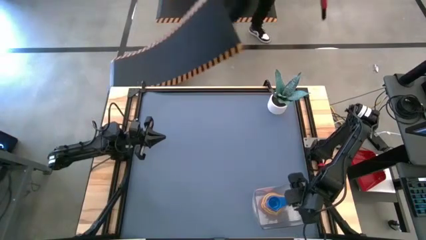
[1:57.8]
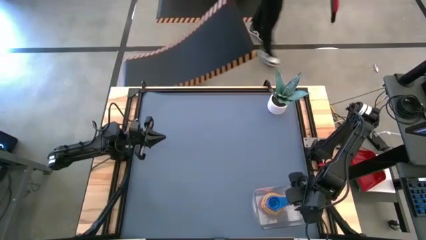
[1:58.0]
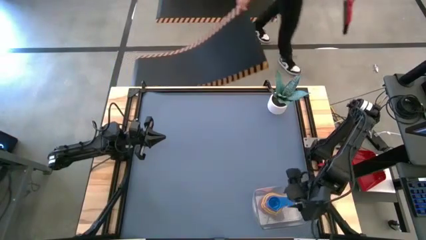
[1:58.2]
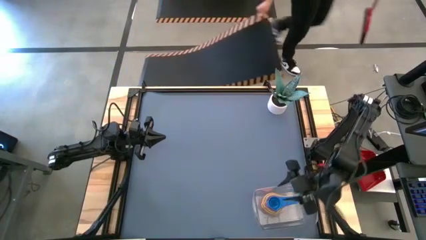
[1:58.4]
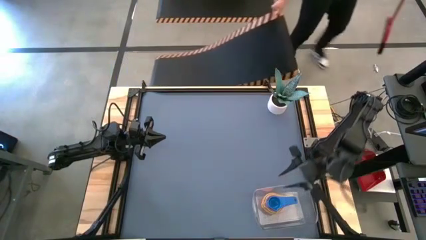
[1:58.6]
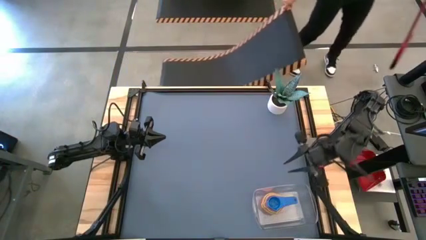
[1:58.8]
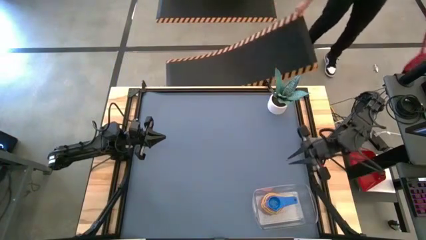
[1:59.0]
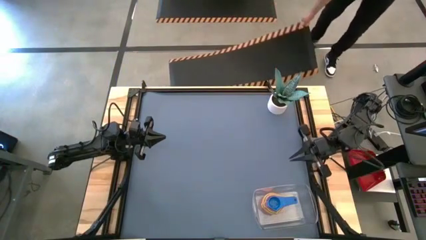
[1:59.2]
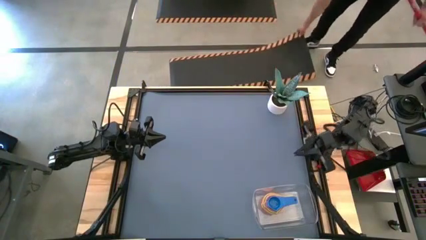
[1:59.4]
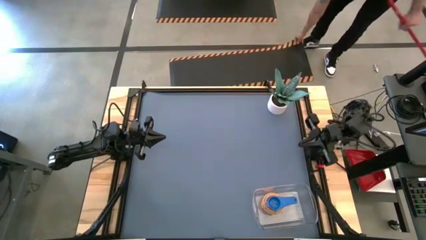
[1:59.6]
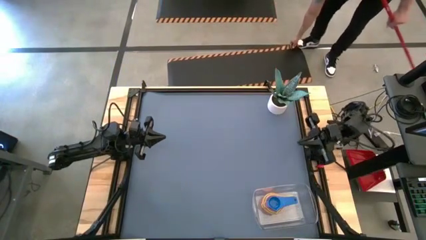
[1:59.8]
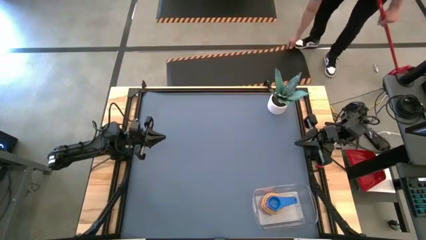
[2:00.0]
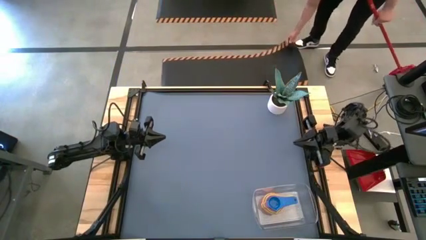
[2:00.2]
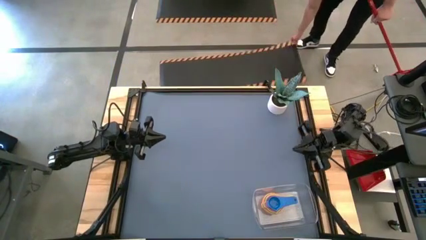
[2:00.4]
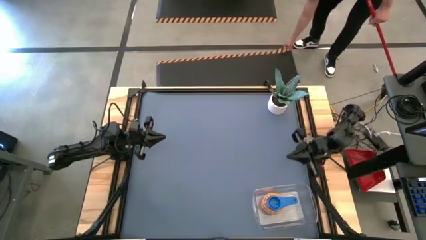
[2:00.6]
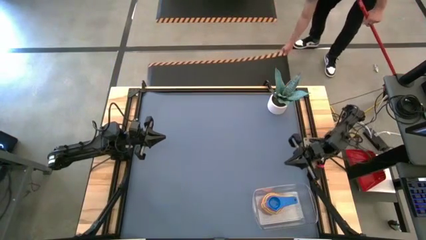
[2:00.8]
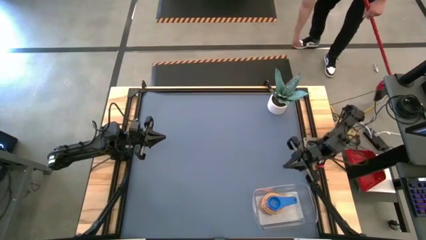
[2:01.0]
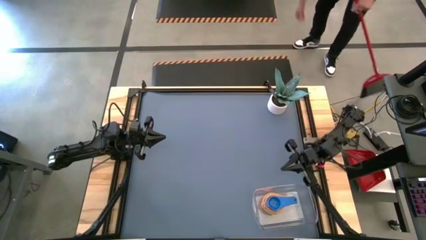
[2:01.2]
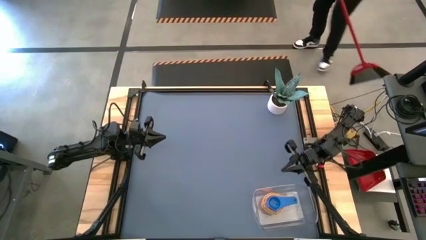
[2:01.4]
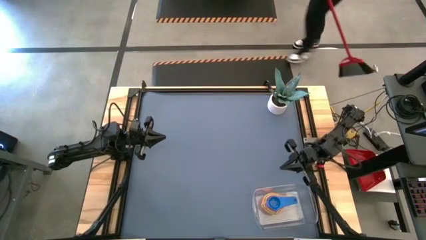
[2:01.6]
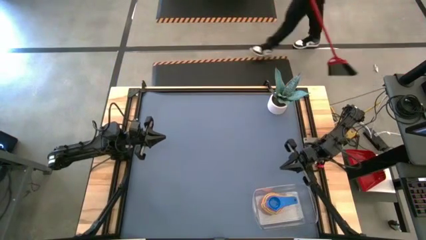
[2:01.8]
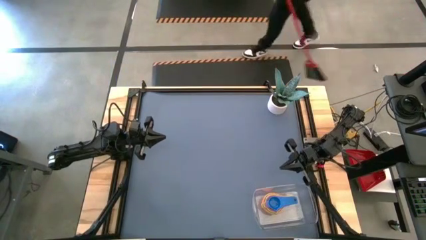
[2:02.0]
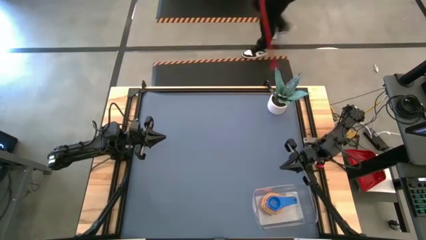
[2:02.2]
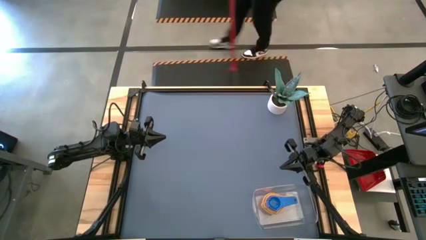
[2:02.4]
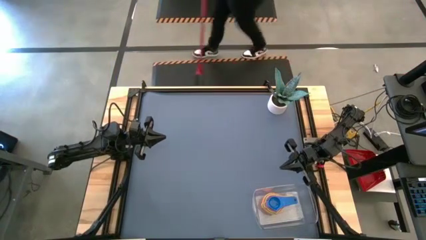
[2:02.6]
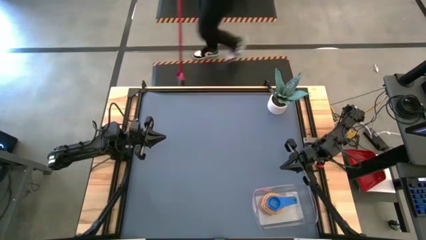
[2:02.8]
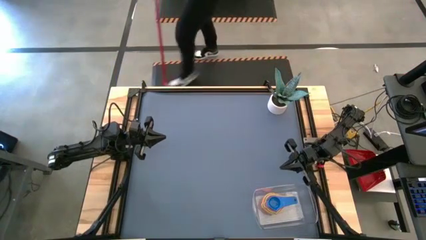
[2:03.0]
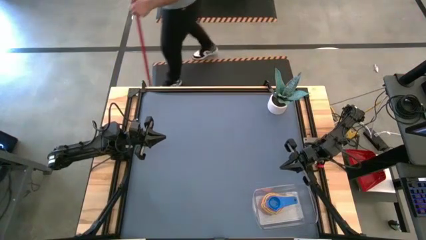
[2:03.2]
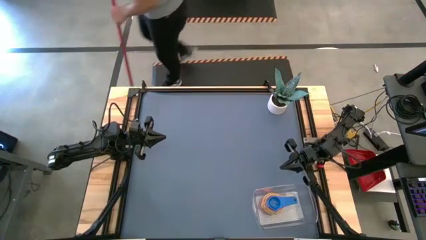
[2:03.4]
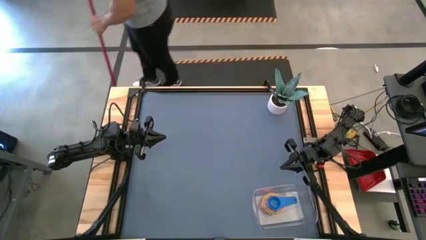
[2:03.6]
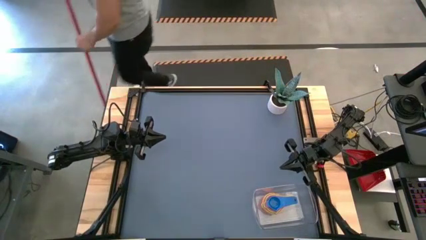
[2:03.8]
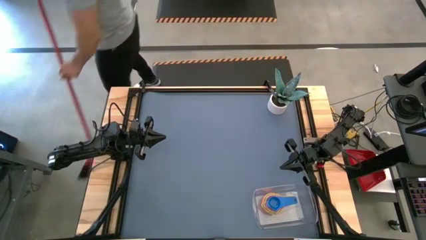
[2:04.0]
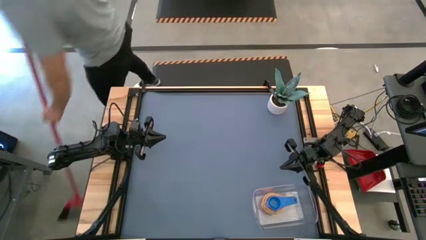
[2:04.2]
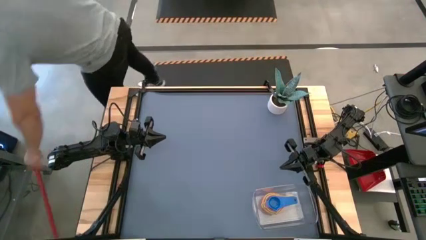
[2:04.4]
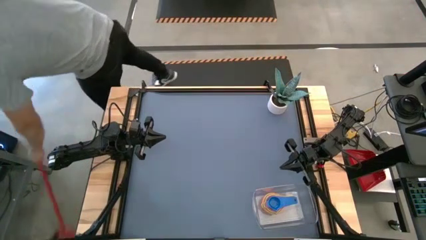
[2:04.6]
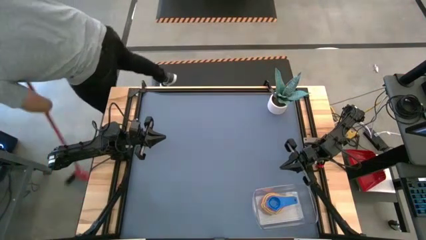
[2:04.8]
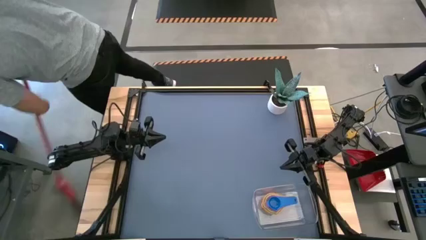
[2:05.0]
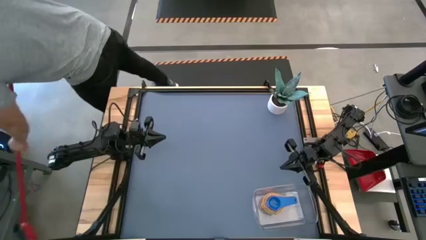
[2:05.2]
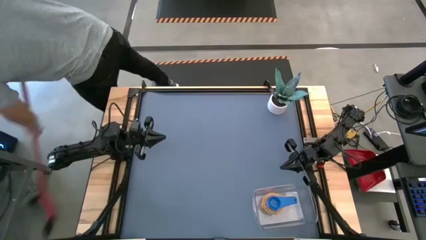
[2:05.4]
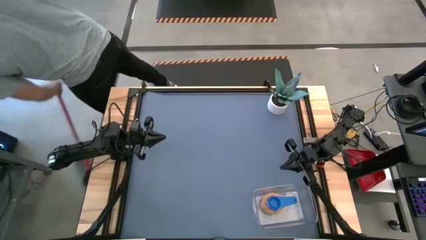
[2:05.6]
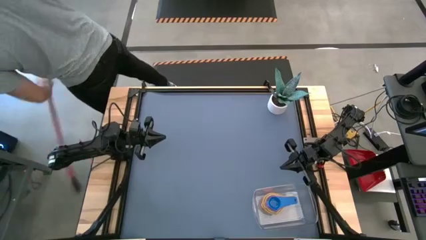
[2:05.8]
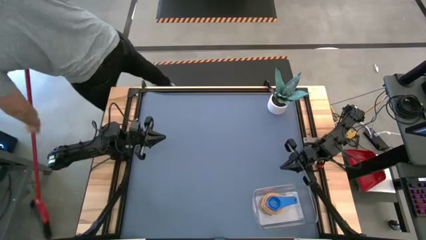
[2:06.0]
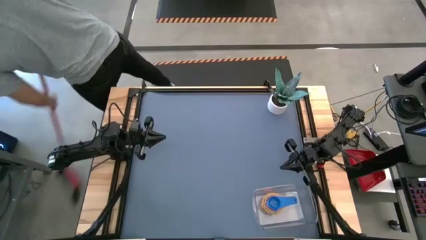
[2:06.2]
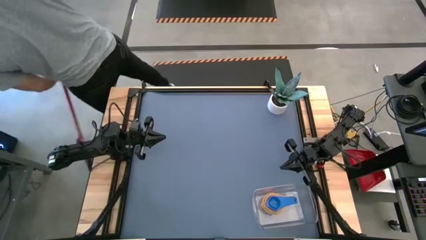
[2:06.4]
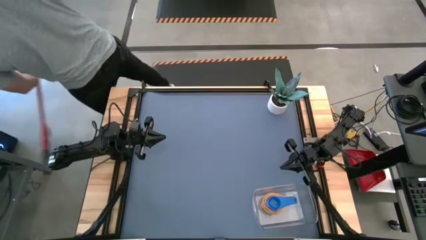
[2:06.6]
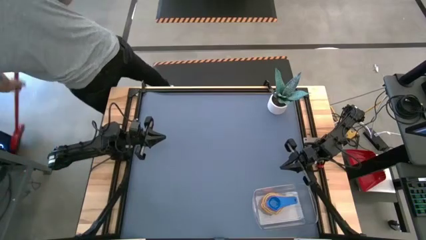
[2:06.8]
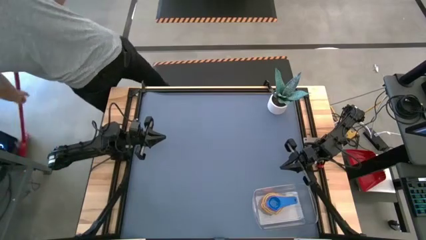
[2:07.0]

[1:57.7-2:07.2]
Task: Nest measuring cups in basket
Return to Home Position

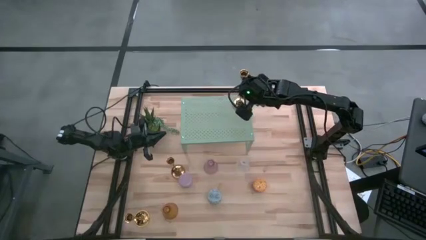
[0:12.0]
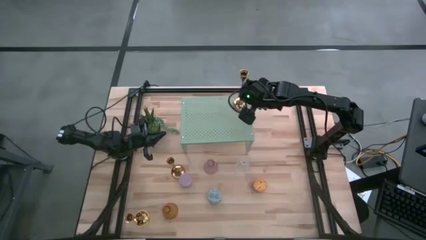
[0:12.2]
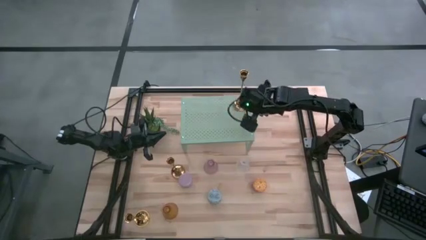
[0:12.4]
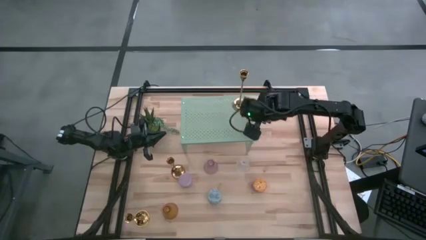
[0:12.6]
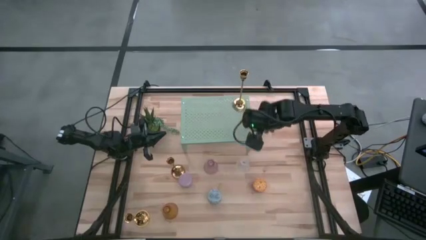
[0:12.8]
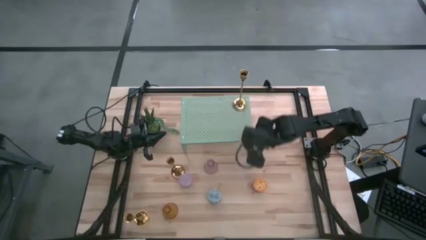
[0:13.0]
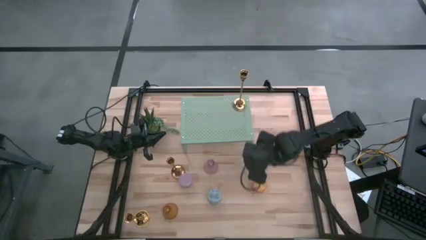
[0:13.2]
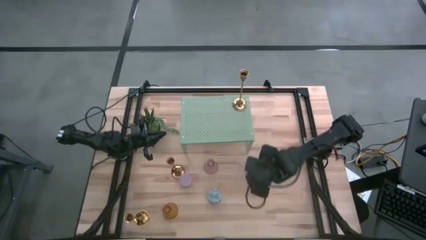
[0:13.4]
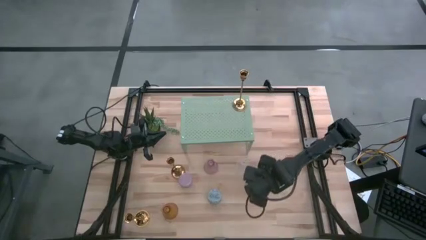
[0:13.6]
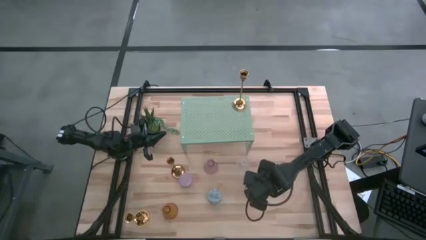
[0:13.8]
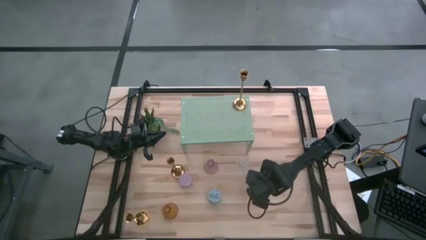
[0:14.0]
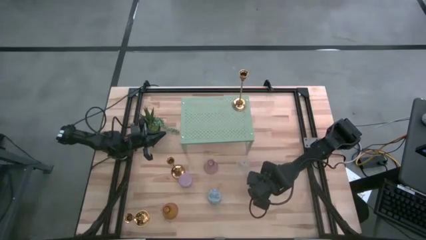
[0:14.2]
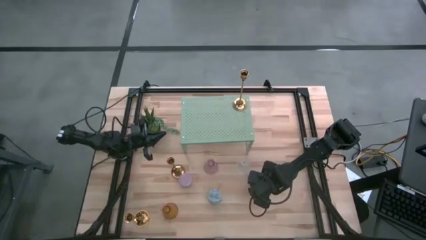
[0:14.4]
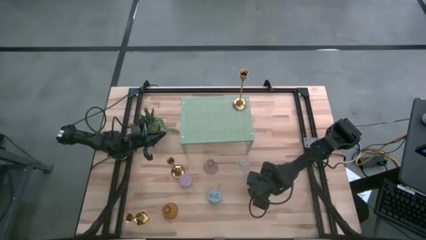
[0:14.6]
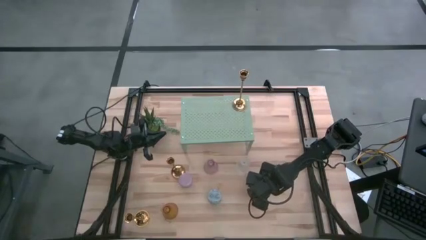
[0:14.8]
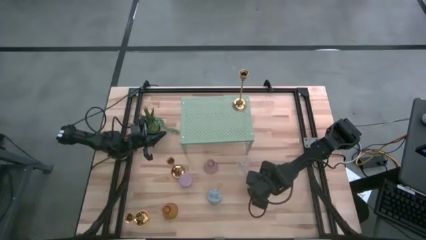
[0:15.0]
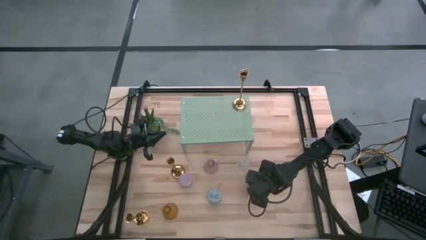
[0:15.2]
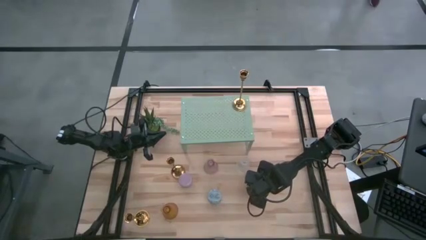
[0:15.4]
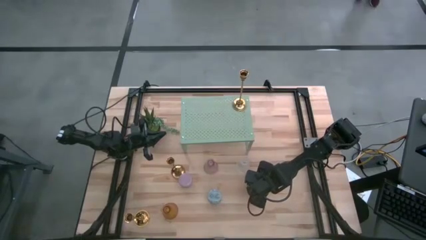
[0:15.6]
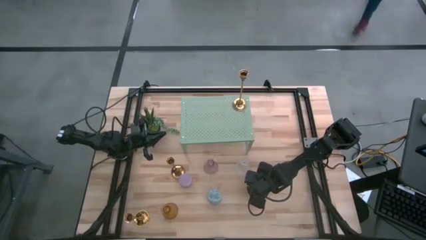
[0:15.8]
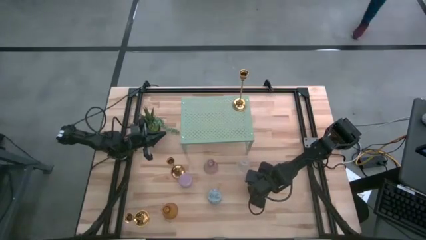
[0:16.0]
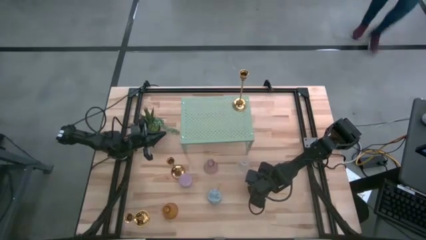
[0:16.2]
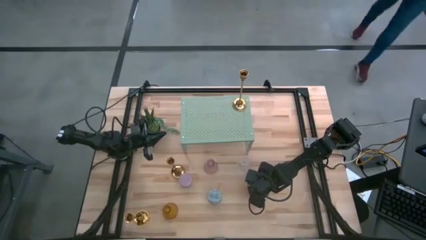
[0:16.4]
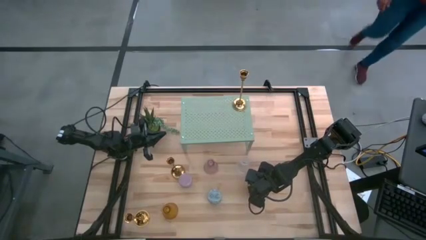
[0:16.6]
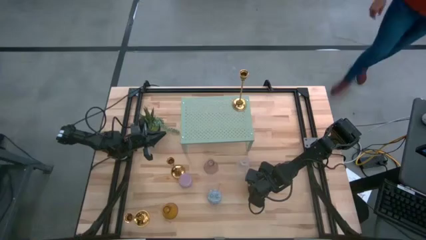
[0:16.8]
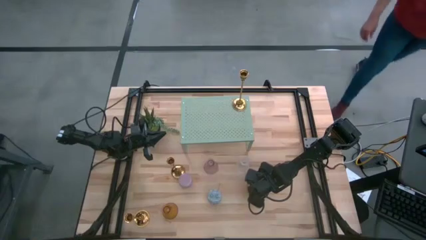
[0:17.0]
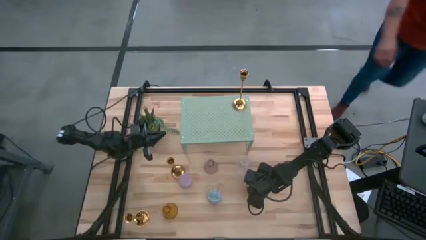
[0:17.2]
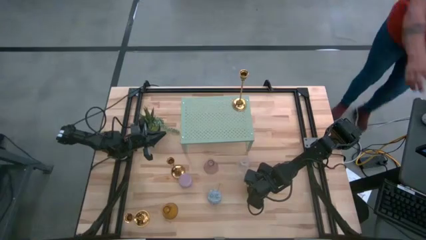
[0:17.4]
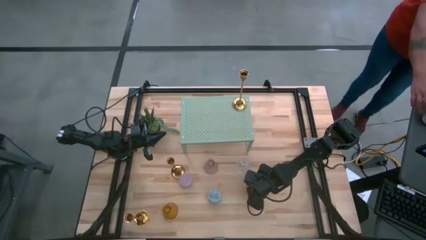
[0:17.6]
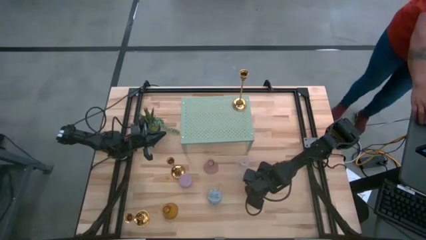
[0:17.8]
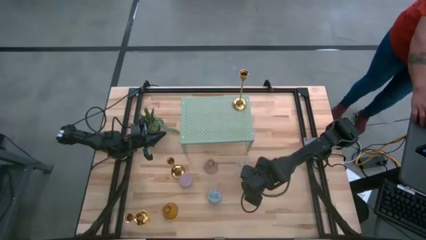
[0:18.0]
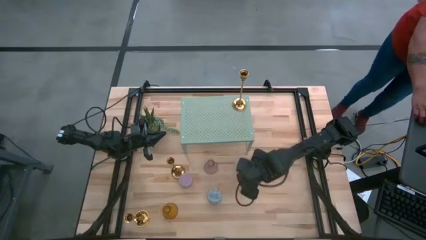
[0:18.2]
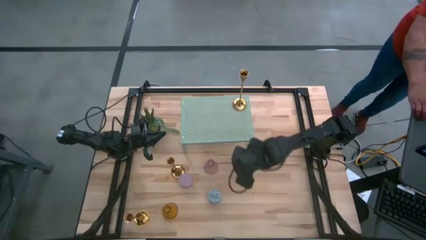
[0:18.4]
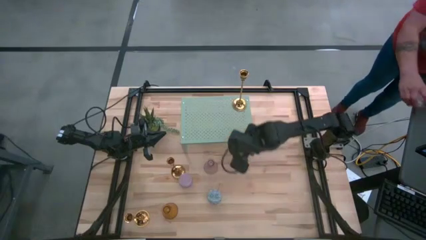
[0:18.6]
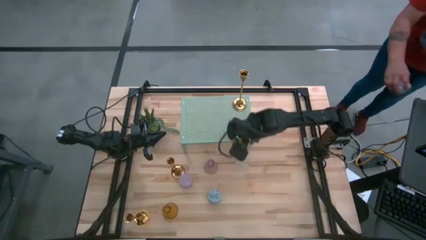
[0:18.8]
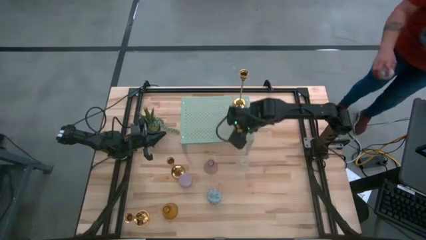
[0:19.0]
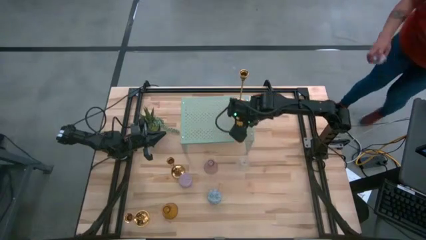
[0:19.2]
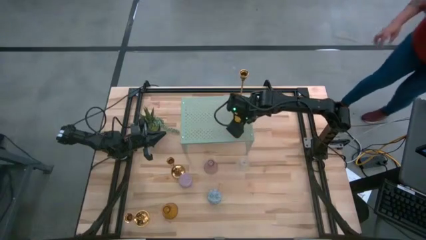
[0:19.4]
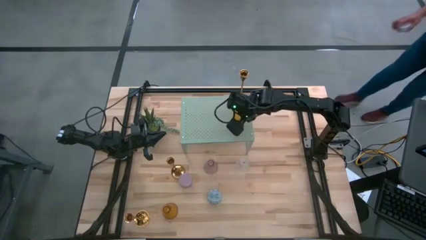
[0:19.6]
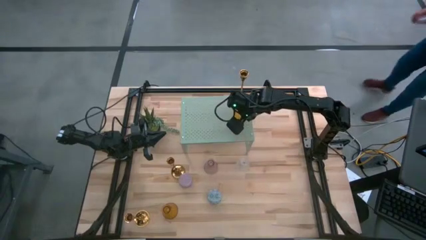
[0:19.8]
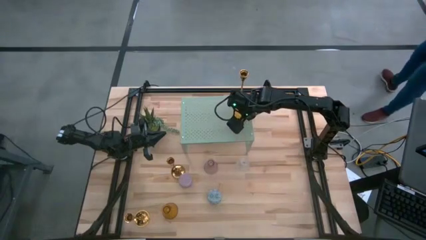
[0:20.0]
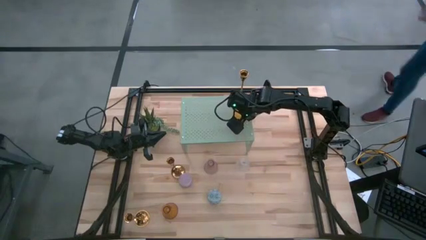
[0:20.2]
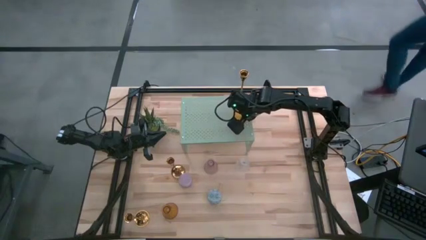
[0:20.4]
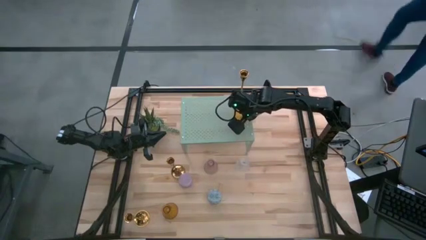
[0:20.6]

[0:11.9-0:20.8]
Task: Pick & Place candle stick holders
Put the yellow scented candle on the shelf
